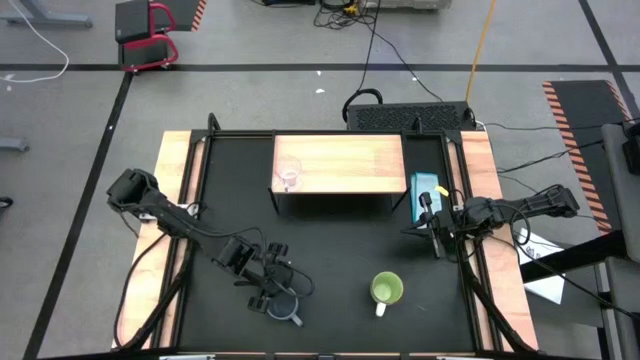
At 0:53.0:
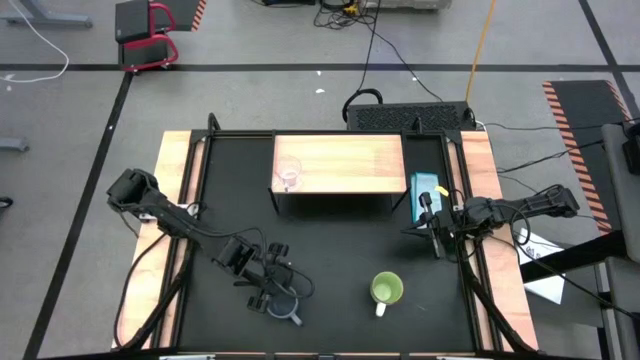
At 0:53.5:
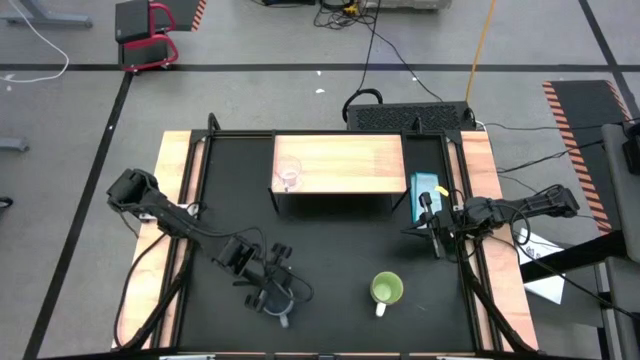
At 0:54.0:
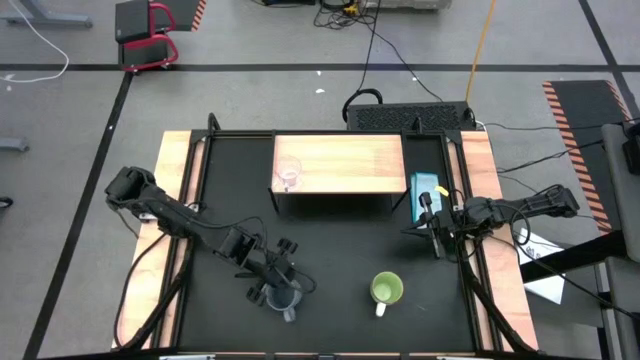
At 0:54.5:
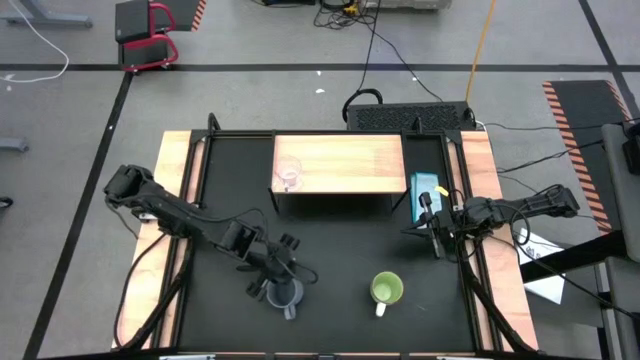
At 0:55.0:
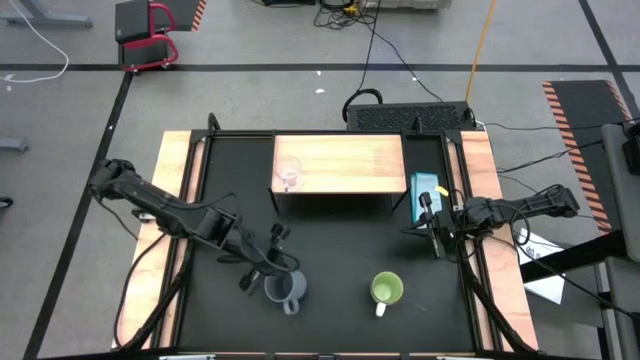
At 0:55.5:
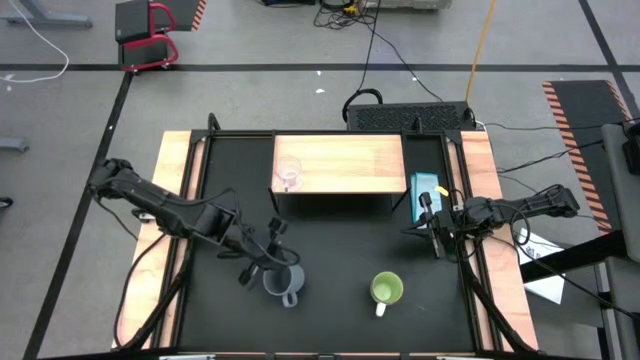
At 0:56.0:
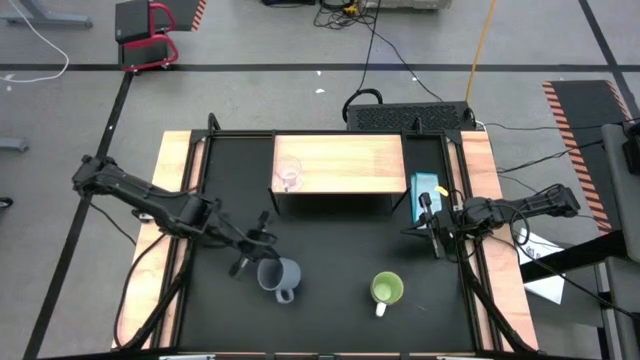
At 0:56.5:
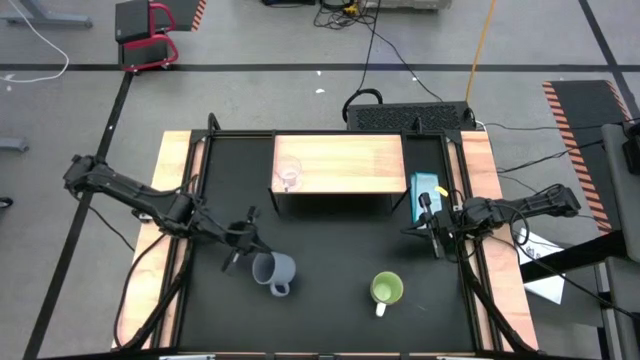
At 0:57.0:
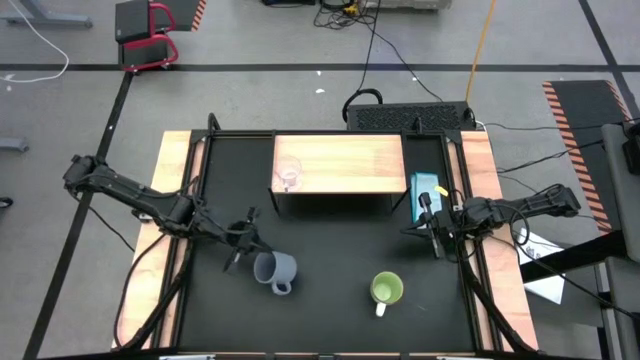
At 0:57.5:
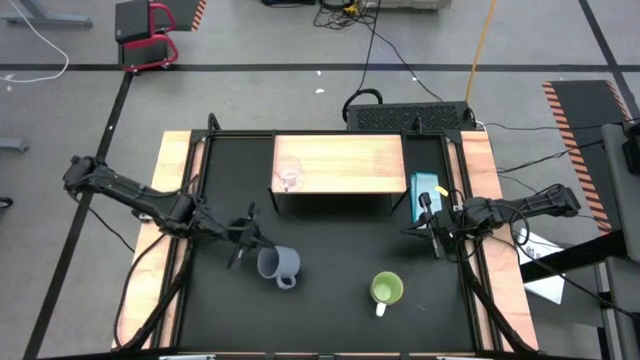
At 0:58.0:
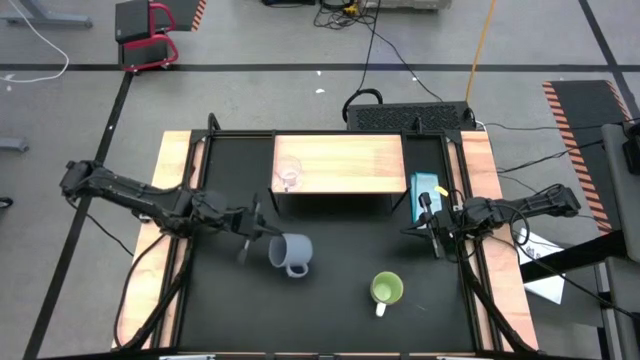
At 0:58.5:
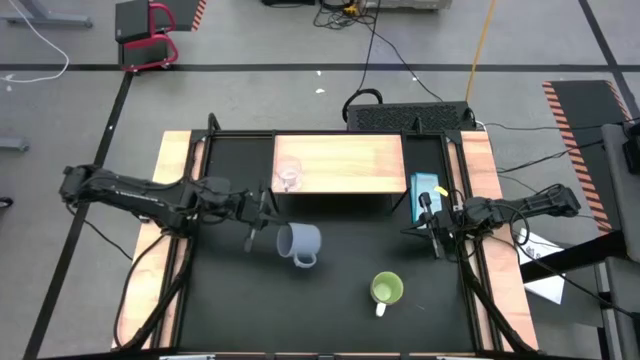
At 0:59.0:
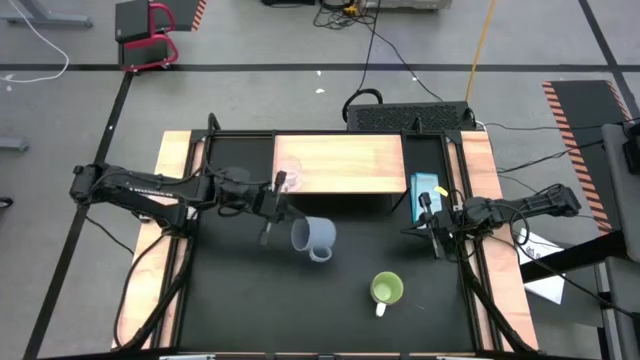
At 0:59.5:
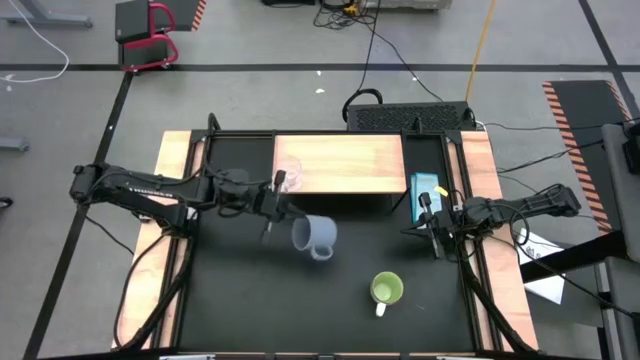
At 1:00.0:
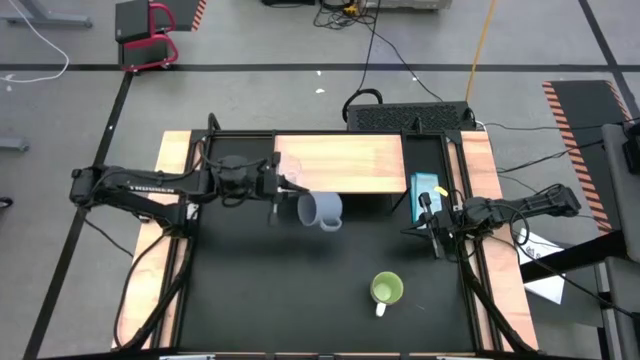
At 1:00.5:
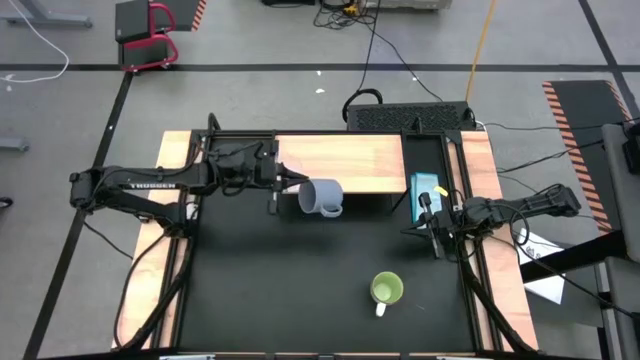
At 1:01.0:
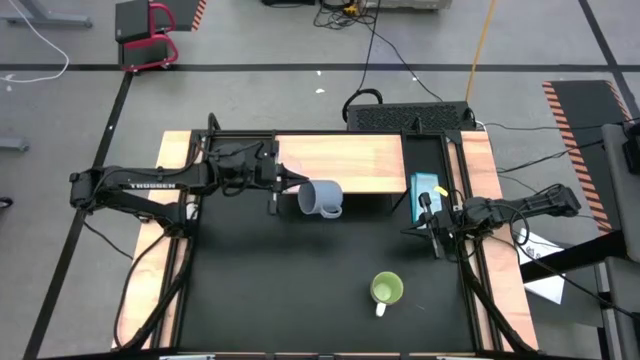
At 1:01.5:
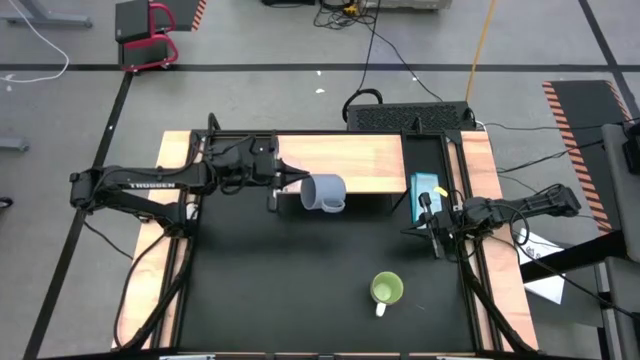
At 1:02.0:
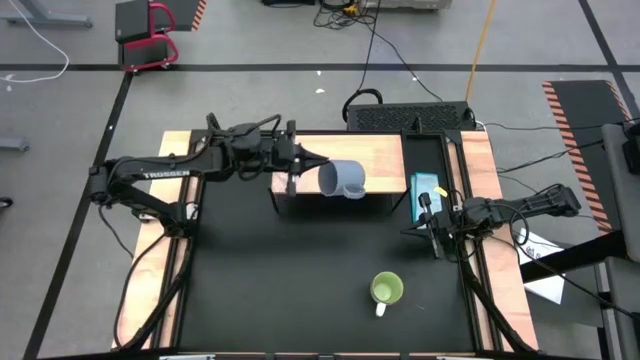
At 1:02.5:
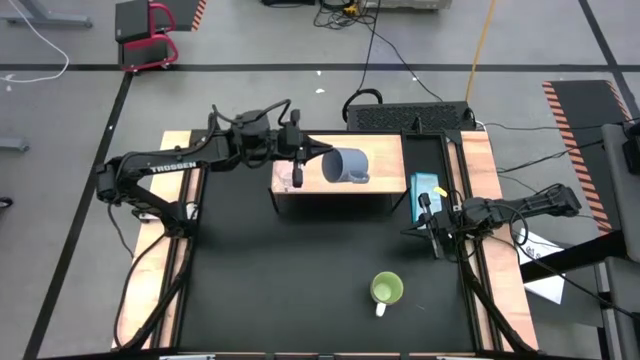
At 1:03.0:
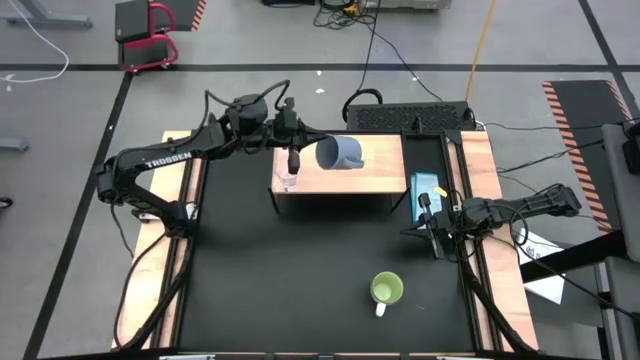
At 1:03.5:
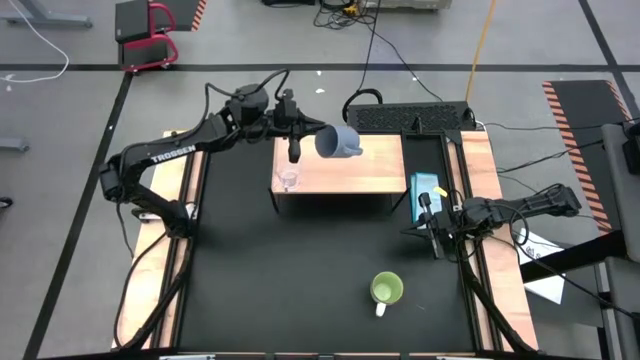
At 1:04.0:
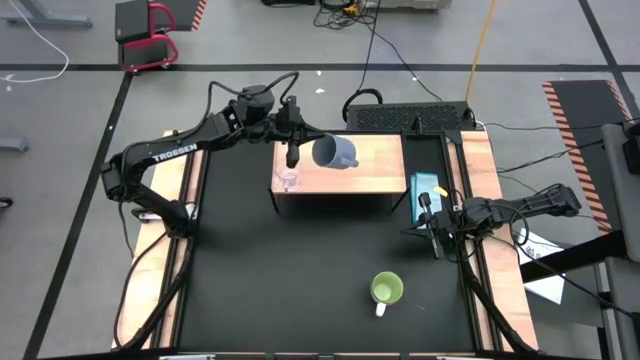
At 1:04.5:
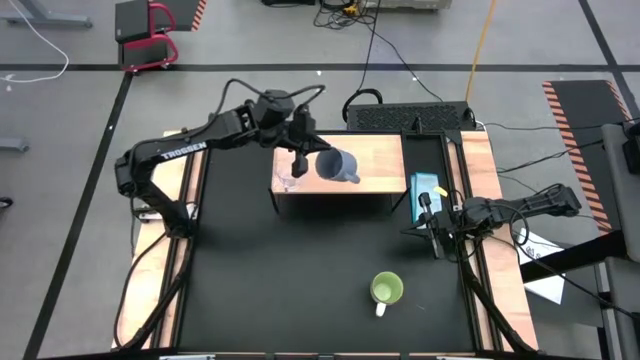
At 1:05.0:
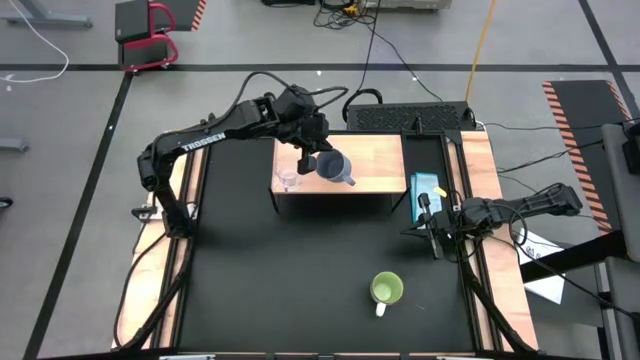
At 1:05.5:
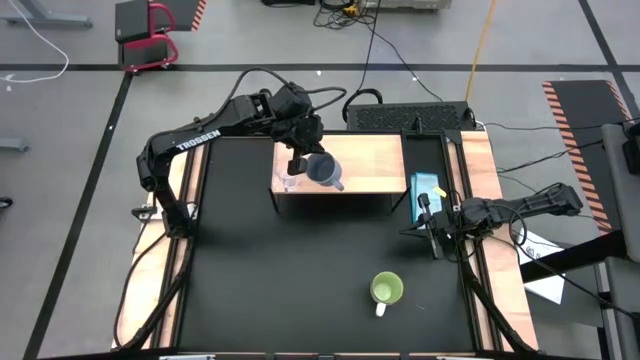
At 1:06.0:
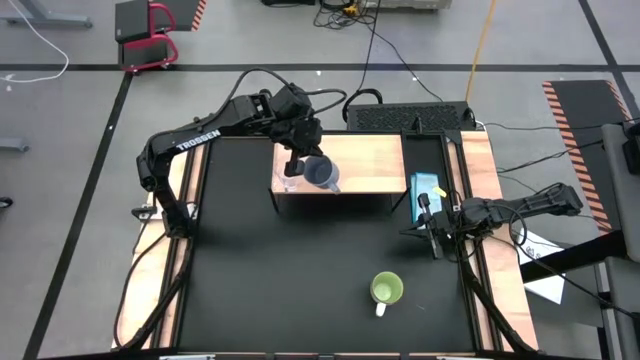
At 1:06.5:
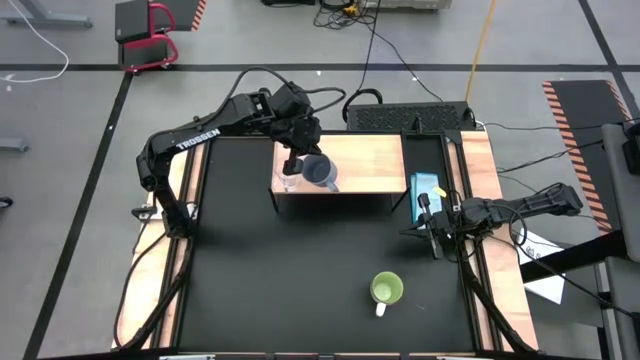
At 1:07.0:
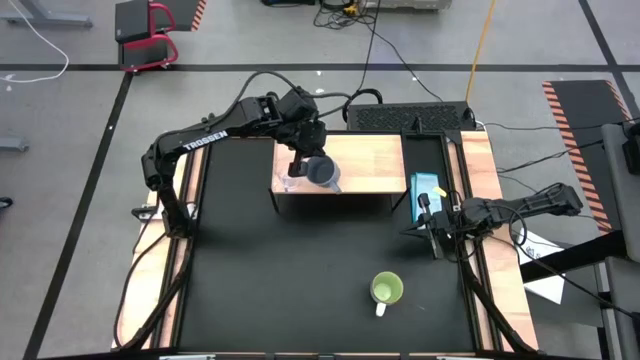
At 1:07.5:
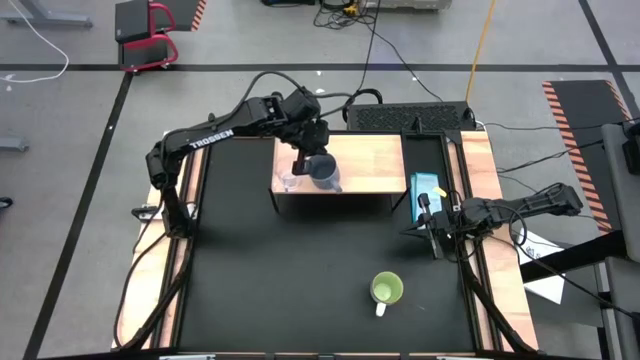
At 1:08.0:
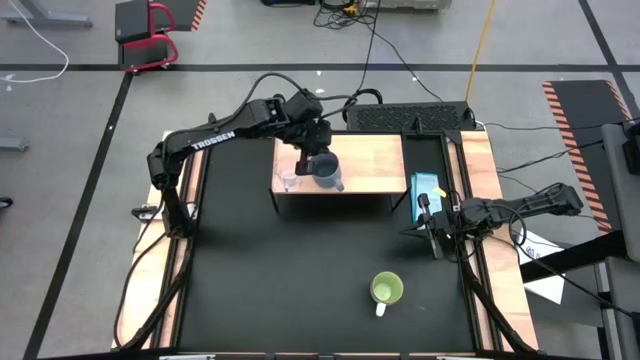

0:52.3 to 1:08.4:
Task: Stack small to large cups/mugs on shelf
Put the gray mug on the shelf

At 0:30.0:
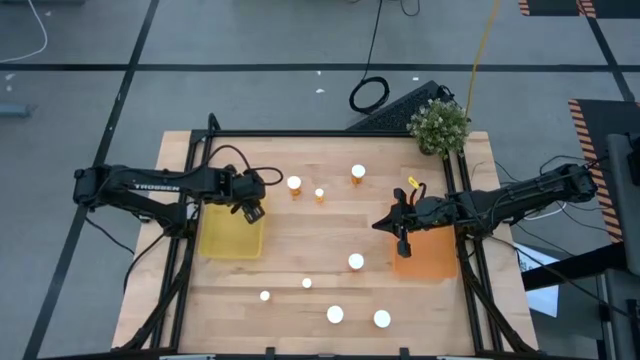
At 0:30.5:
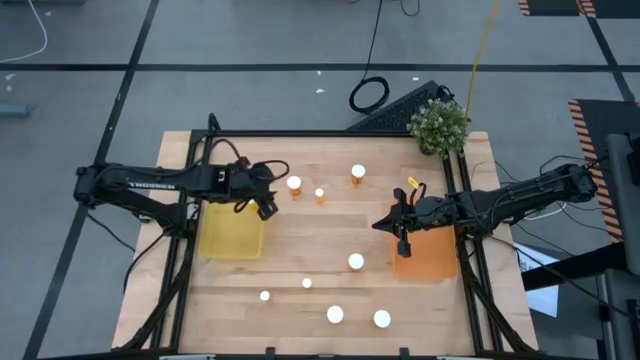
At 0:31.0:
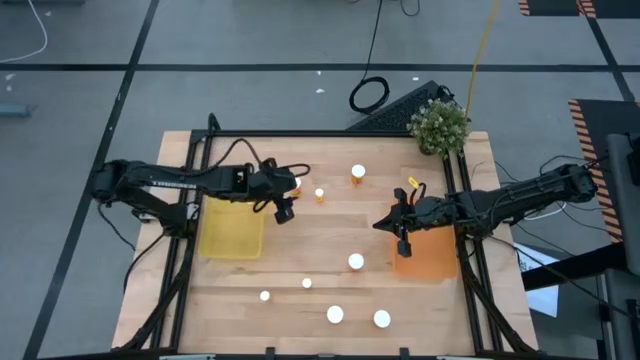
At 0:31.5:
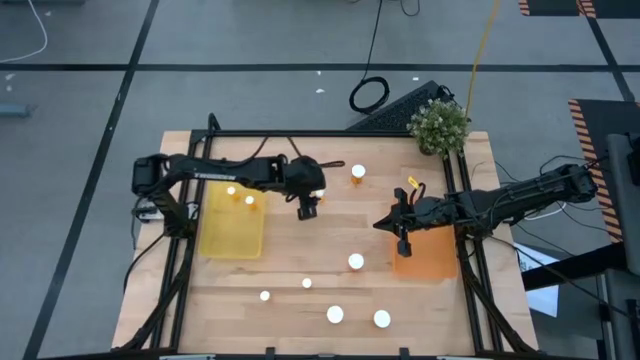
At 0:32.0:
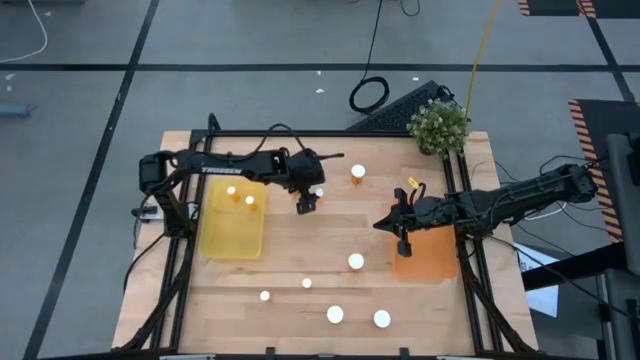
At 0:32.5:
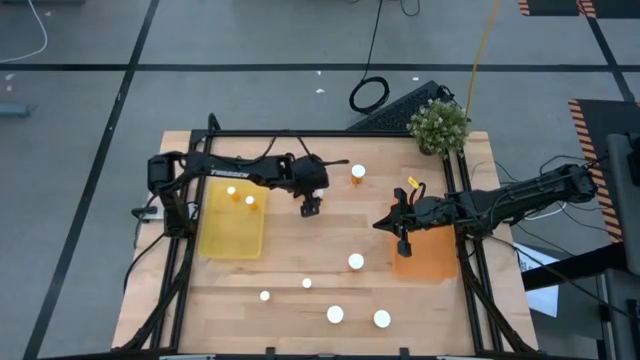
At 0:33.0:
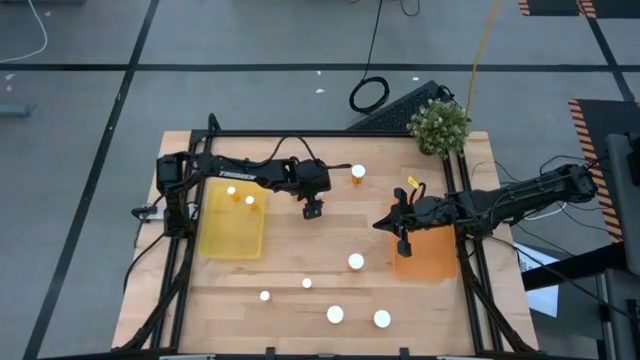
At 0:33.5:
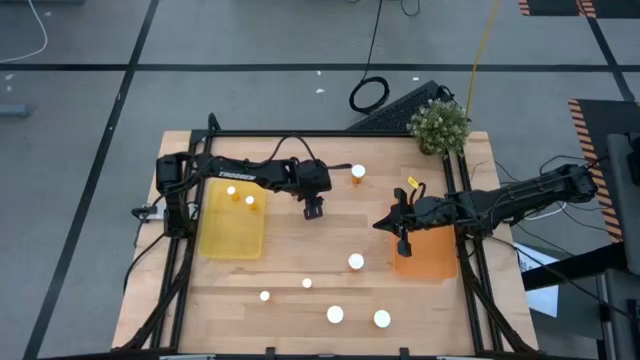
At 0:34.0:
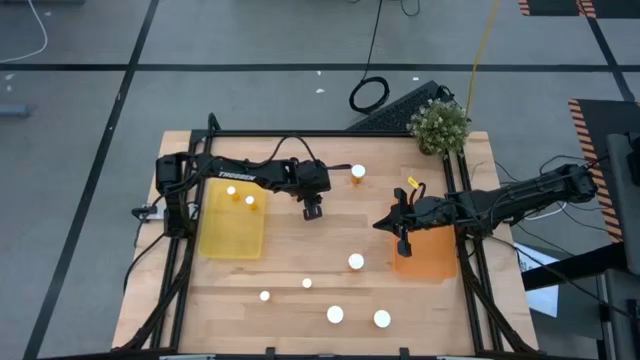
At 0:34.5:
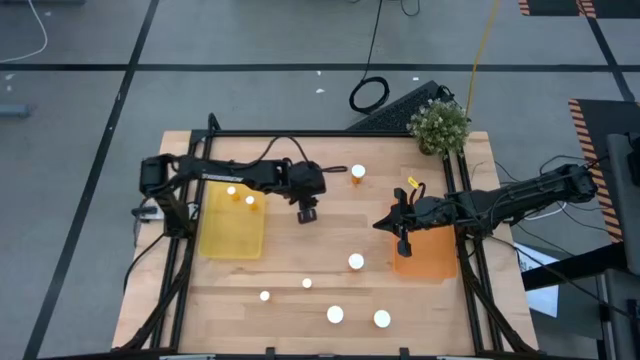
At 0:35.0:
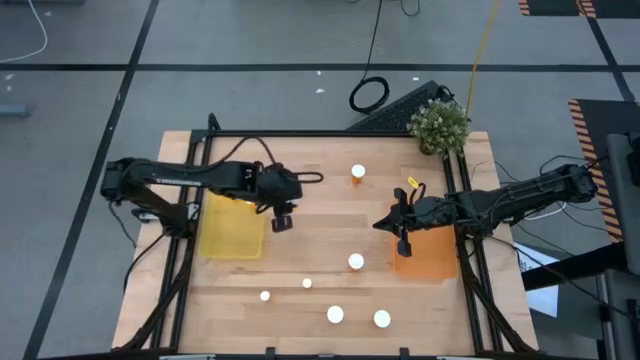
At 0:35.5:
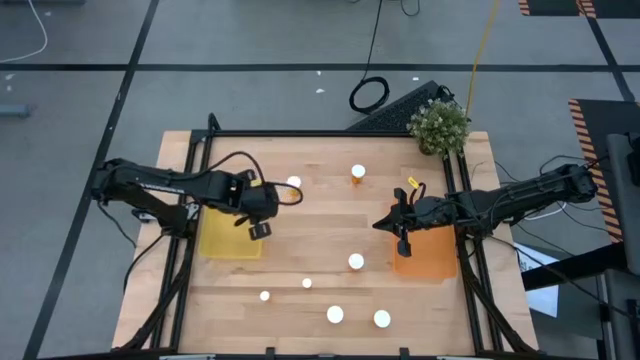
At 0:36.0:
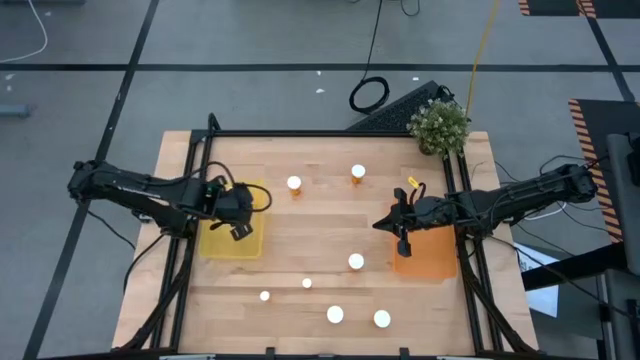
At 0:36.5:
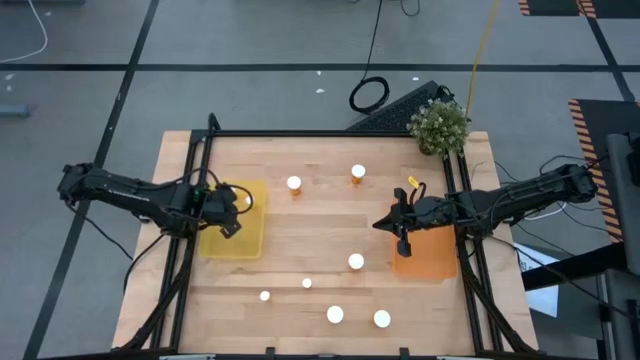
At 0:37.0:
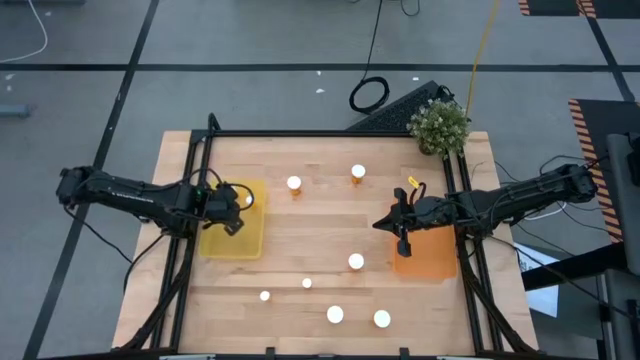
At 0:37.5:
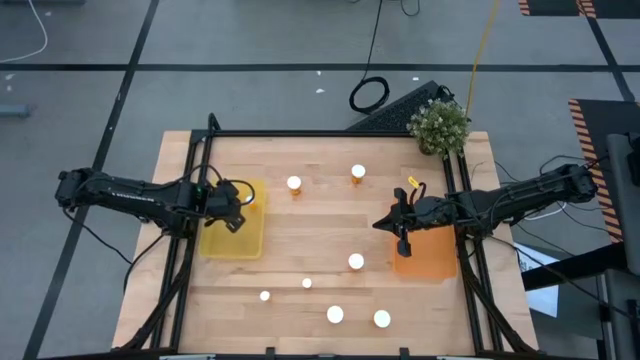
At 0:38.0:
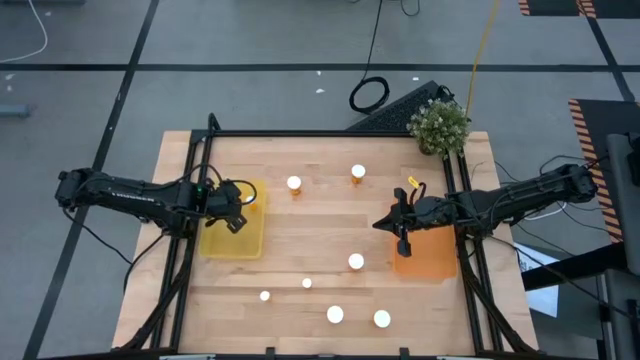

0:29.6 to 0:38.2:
Task: Pick and place medicine bottles into bin by pill shape (circle, oval)
Put the small orange pill bottle into the yellow bin
